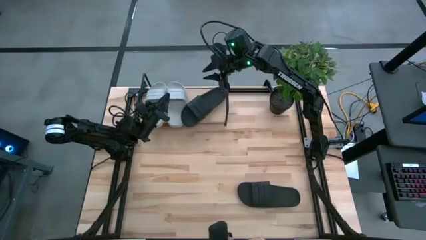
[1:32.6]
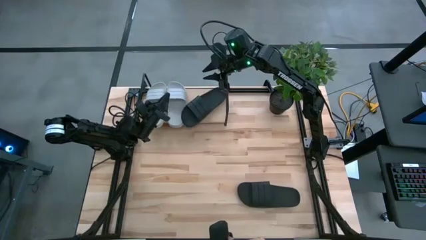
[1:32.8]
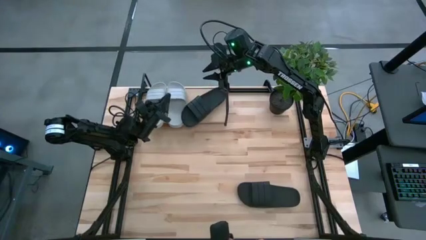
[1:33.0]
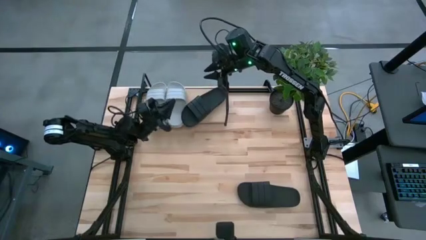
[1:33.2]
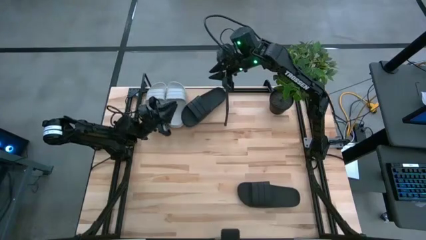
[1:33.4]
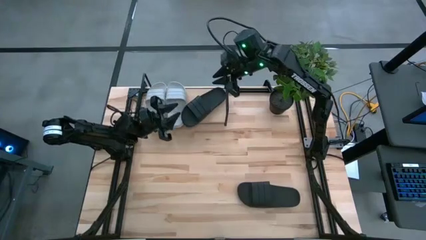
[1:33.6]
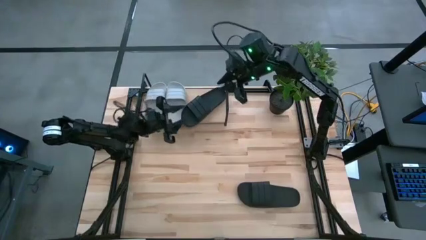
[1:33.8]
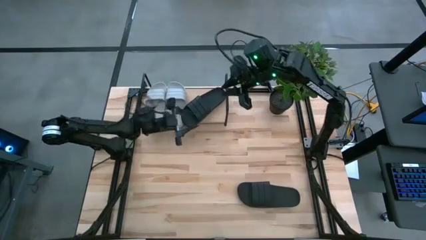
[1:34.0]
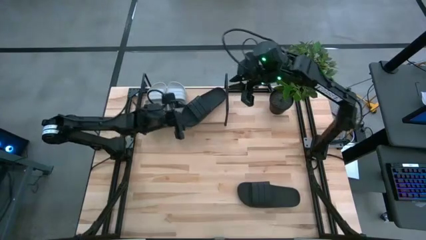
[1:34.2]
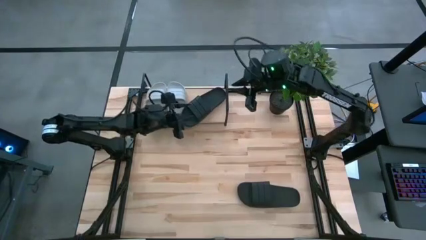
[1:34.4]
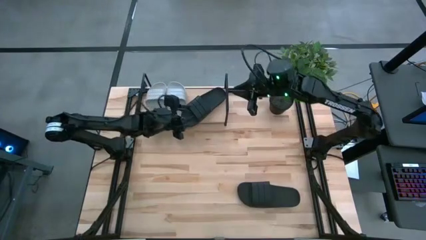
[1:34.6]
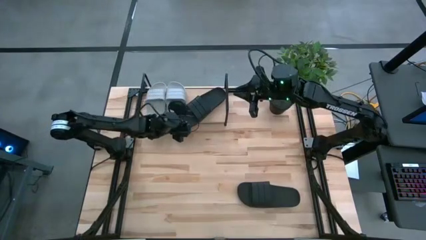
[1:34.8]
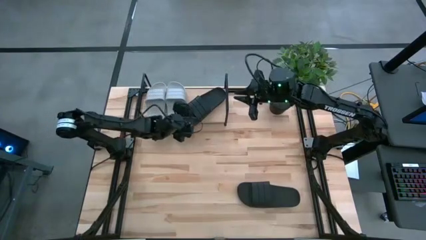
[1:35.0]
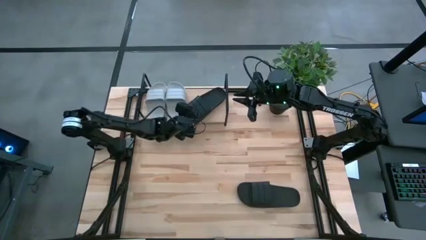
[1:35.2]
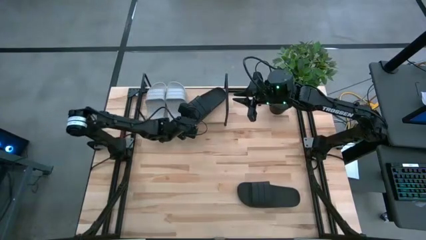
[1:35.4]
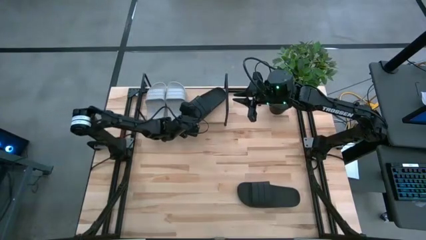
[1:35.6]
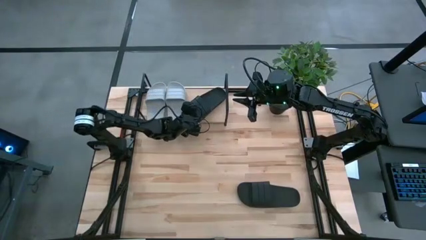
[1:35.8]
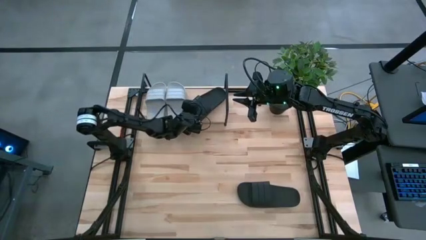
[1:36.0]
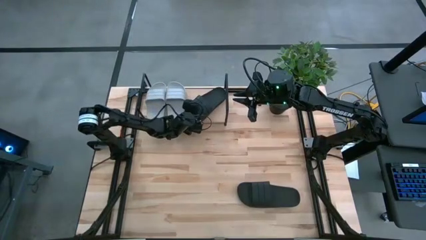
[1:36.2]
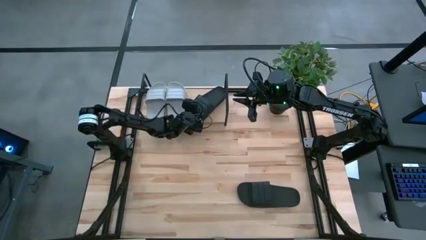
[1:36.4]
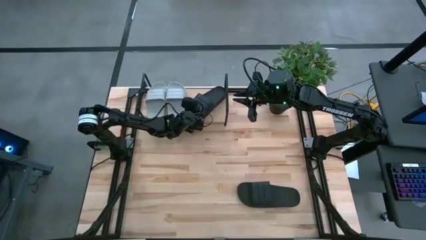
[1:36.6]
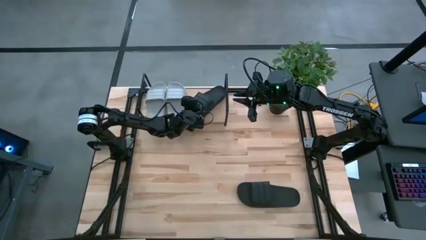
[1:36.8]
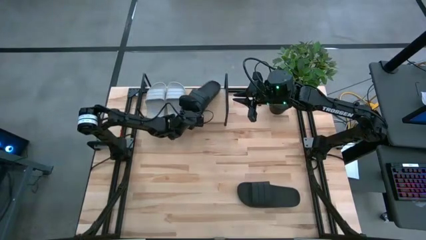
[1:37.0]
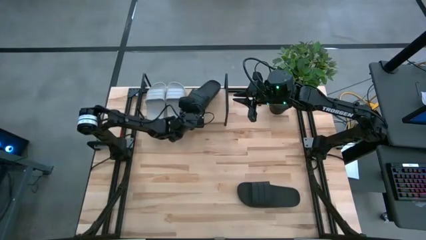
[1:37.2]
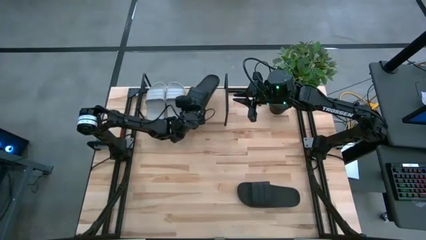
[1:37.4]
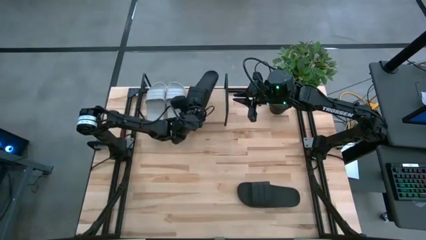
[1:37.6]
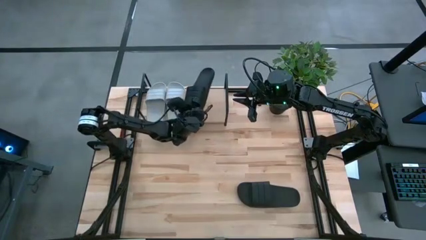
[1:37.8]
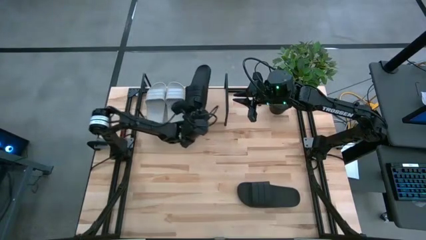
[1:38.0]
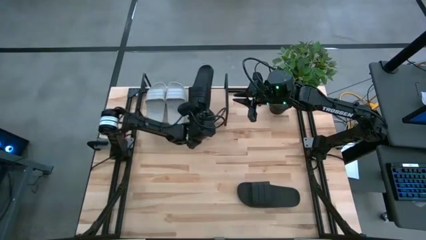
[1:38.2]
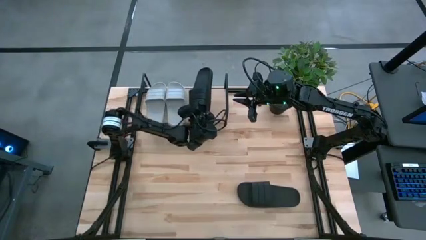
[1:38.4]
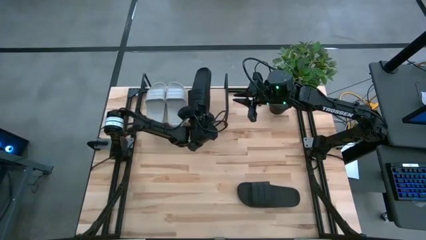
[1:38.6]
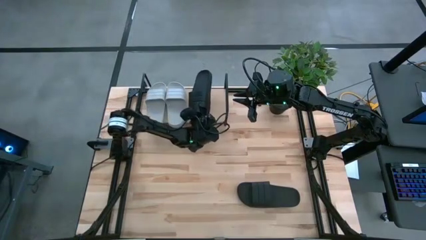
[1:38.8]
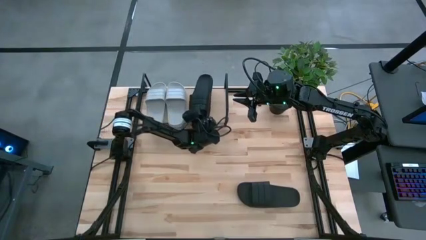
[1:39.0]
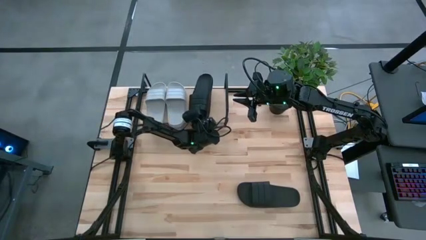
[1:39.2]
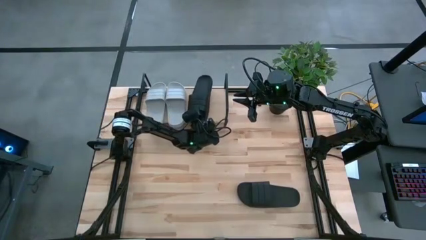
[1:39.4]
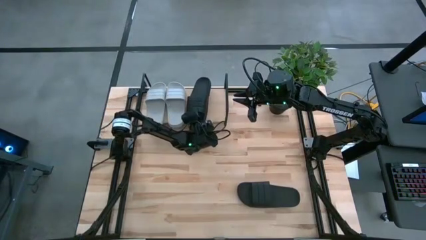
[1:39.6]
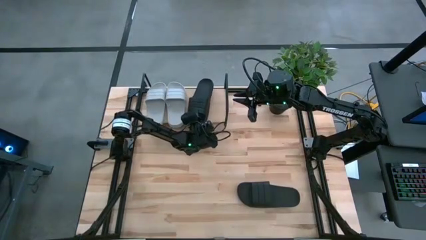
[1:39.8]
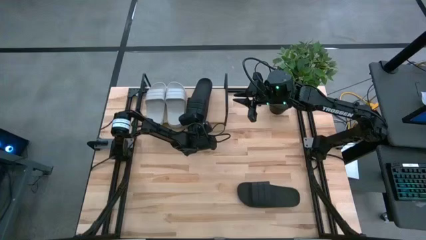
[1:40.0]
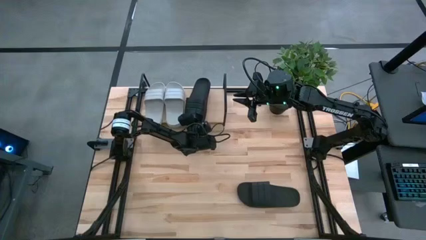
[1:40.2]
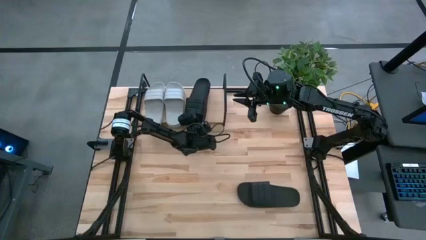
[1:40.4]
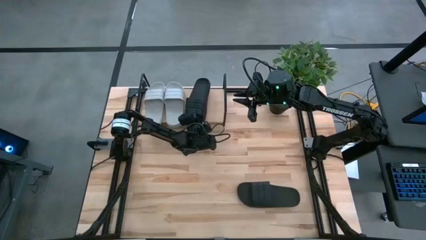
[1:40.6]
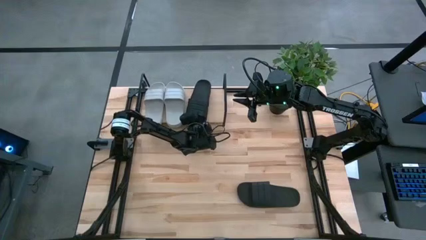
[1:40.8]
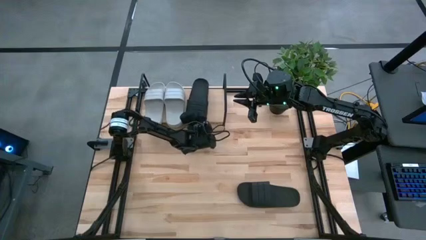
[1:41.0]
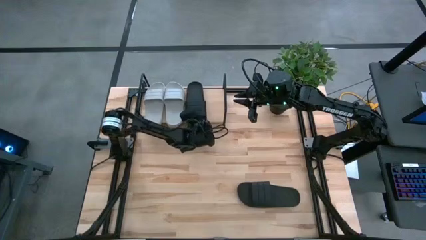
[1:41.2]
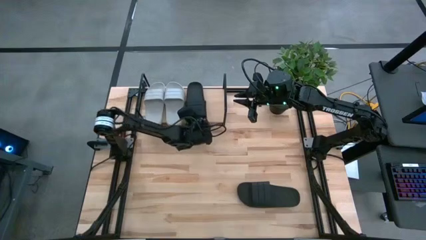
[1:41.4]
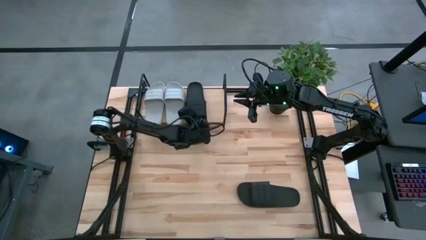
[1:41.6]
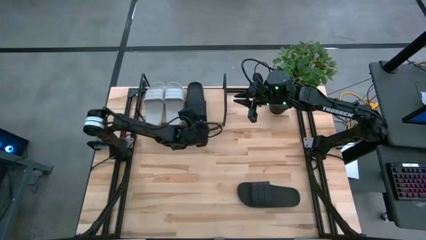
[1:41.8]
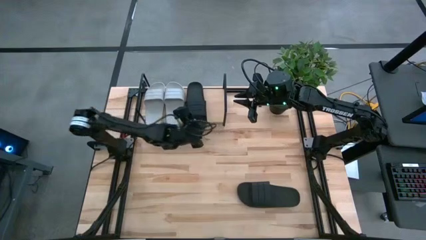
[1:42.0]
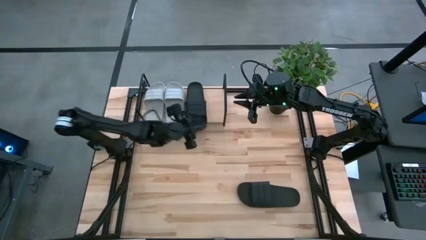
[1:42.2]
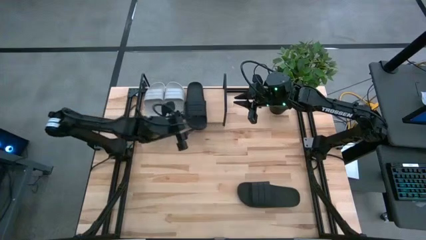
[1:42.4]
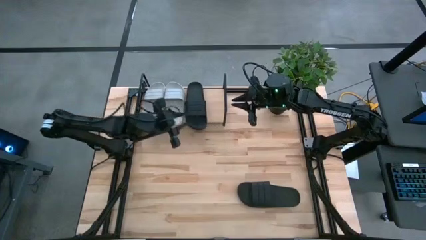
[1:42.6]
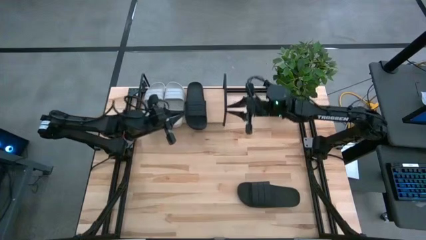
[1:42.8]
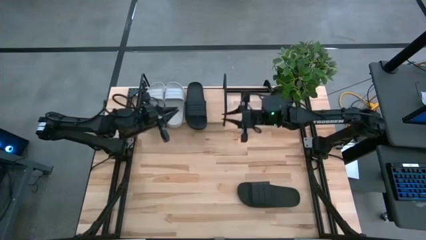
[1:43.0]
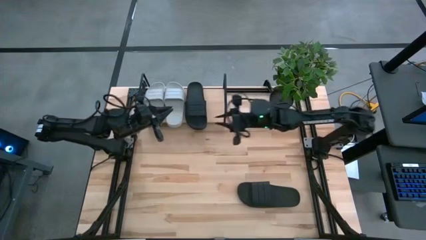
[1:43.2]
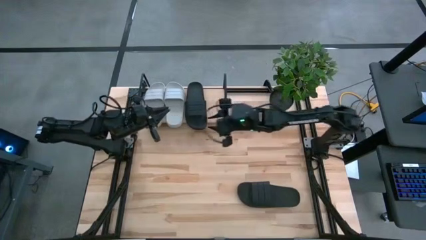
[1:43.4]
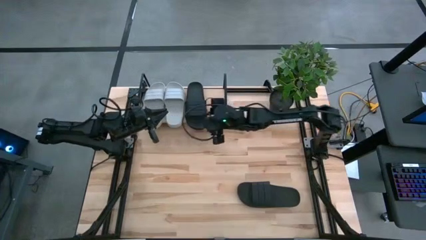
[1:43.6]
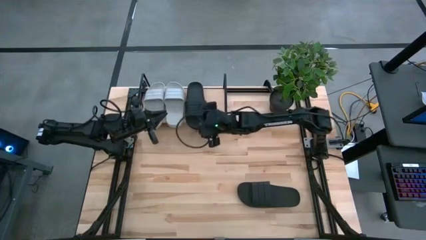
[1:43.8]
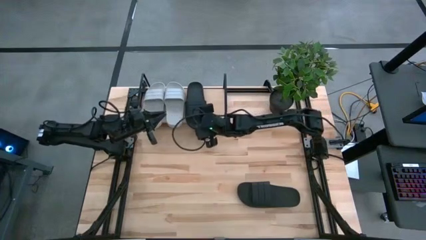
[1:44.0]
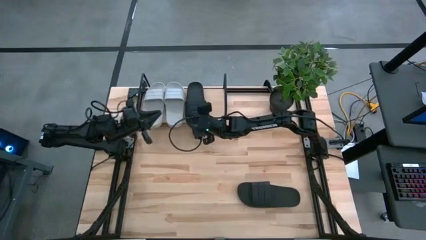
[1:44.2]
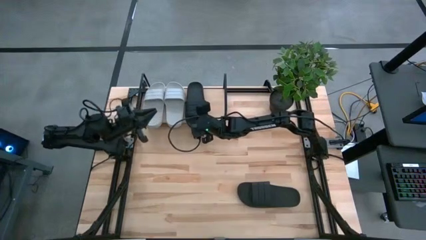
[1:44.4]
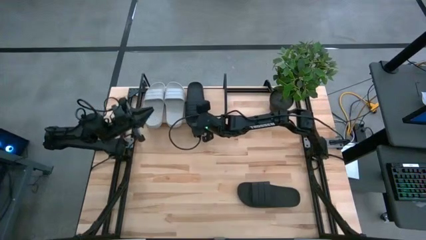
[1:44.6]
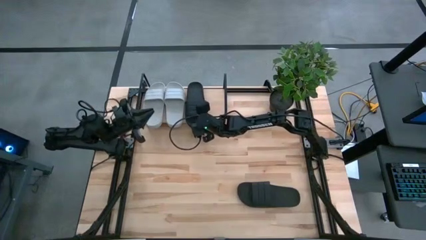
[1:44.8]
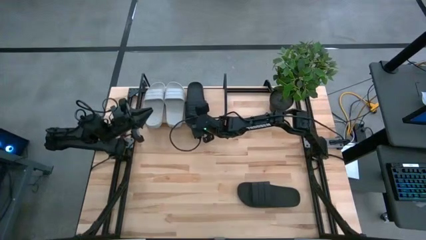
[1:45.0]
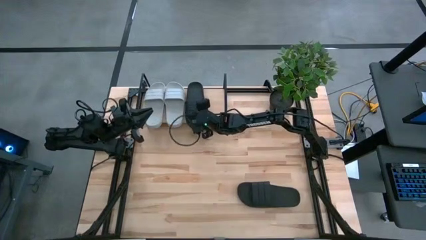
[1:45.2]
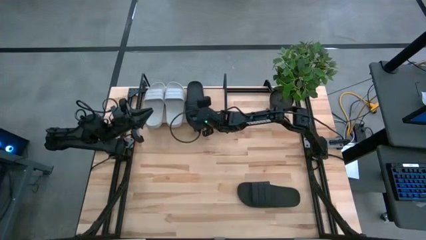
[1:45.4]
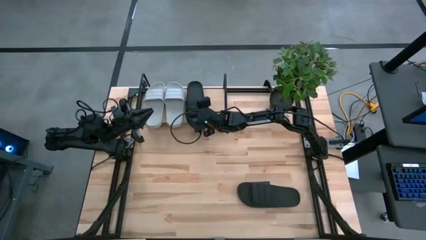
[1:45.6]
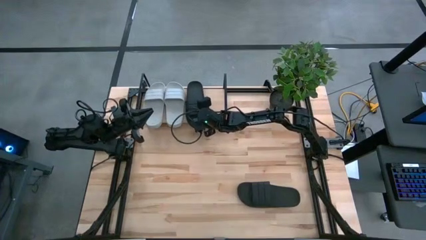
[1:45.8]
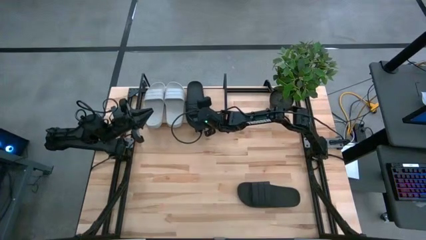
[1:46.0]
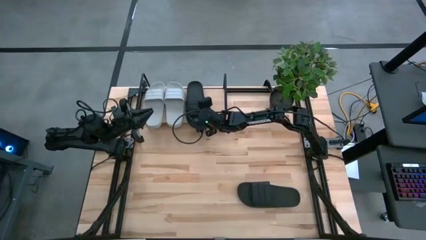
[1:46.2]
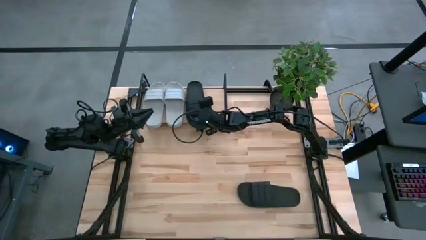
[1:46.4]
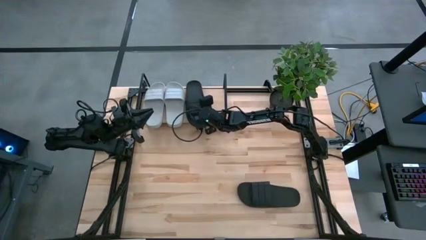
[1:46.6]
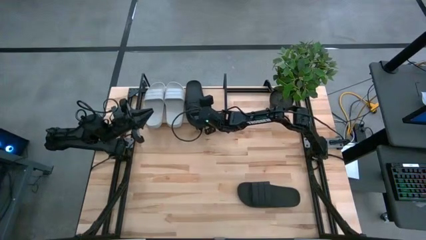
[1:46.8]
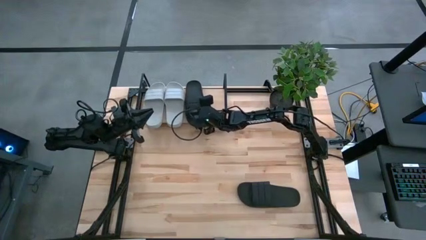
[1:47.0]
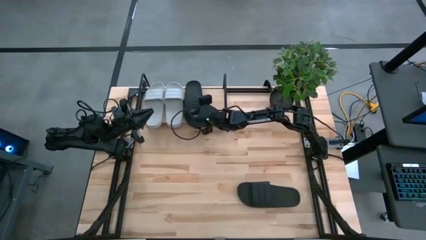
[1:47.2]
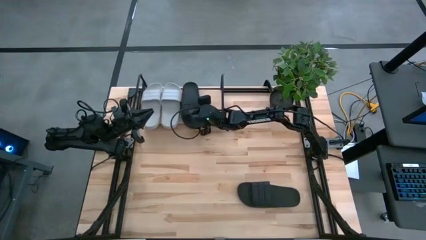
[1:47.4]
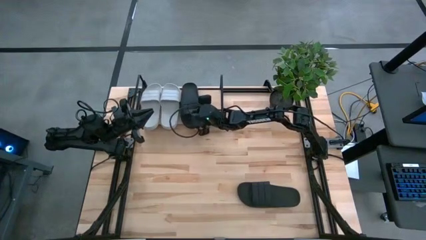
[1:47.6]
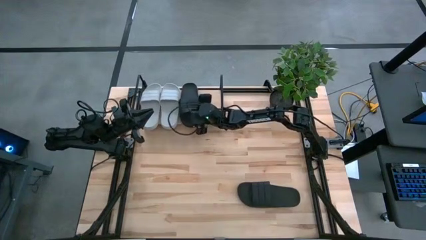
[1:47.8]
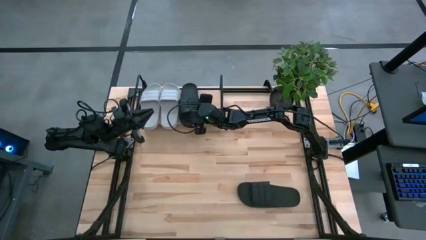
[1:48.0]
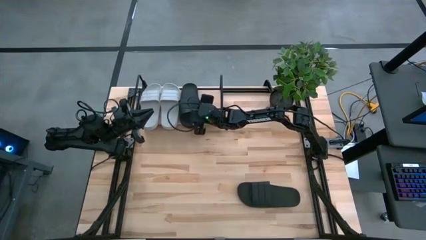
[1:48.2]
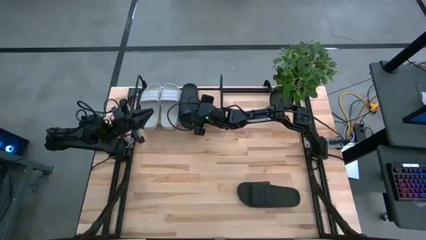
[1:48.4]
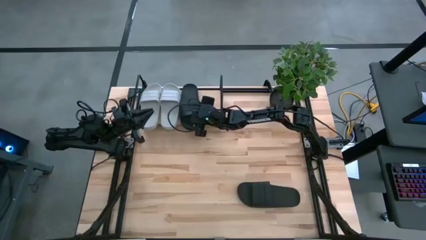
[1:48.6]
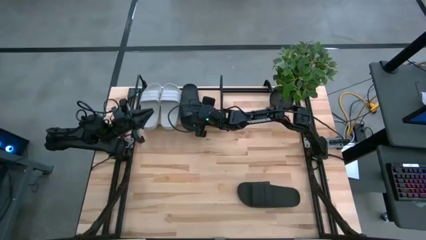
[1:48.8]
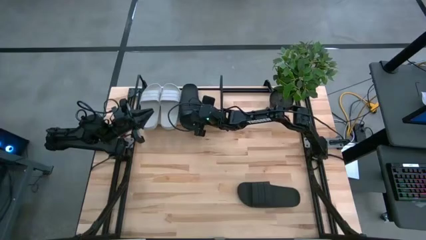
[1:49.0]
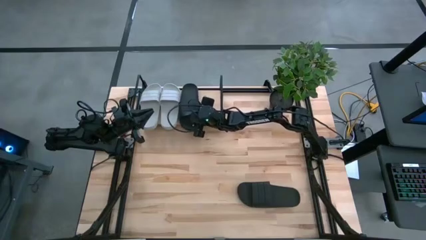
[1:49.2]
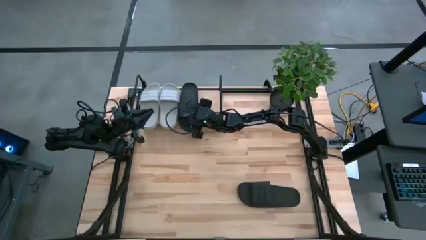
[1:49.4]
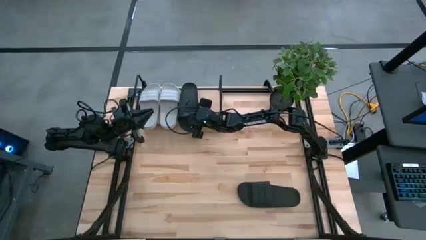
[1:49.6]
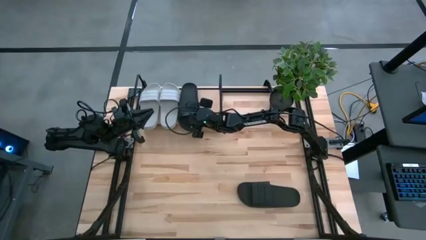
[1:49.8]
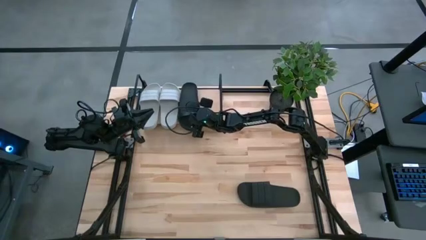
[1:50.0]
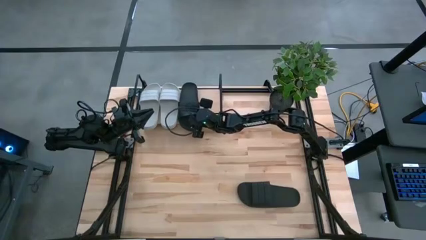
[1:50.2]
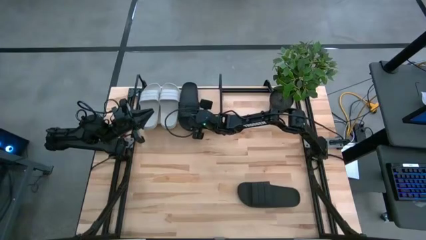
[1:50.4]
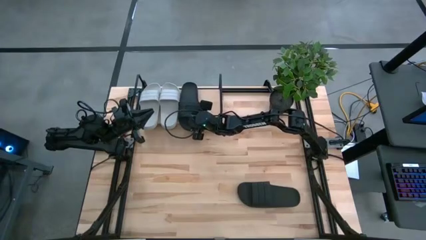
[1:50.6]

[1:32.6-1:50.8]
Task: Pick and place slides into the shelf
Put the top black slides on the shelf
